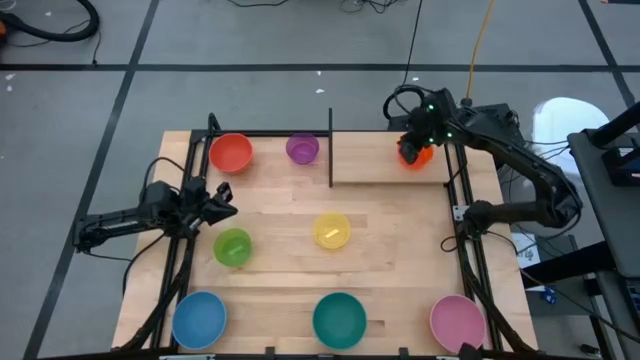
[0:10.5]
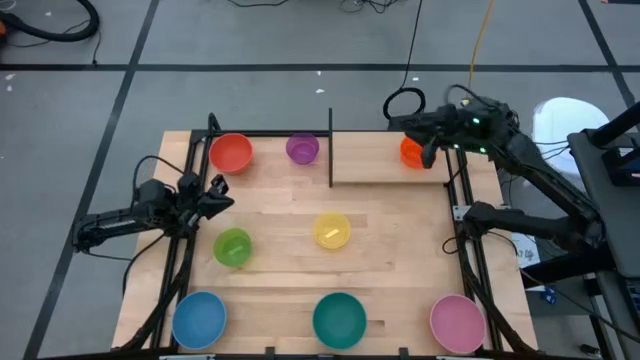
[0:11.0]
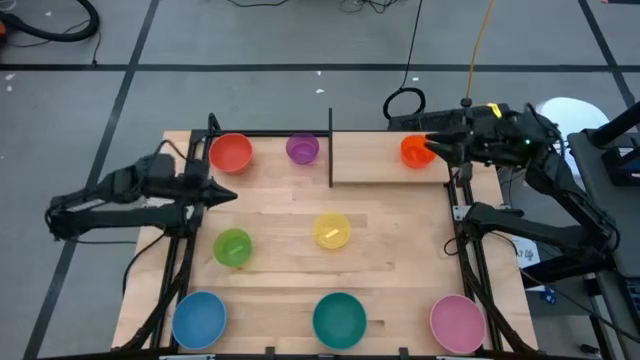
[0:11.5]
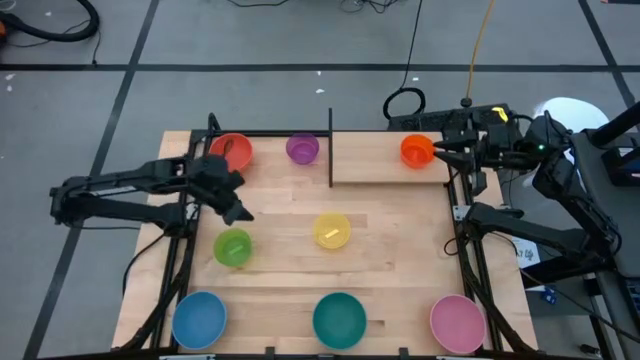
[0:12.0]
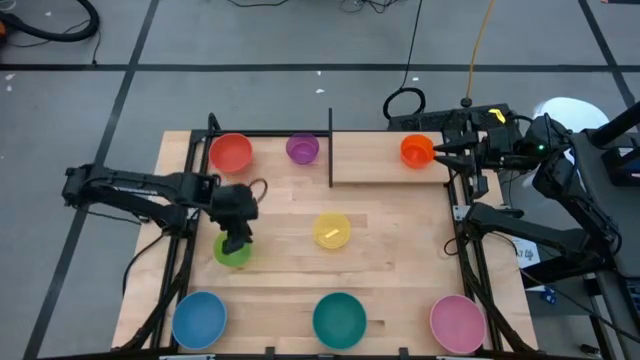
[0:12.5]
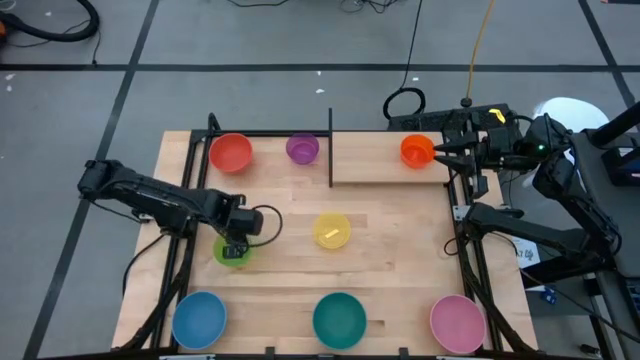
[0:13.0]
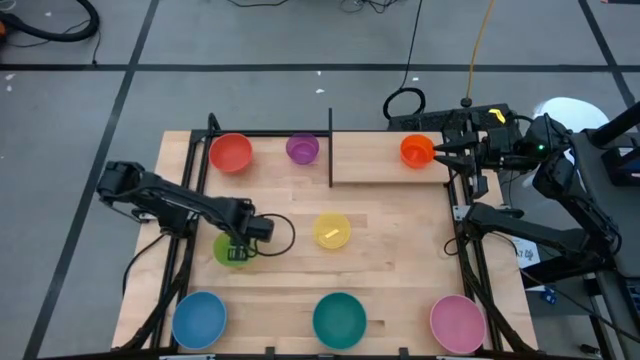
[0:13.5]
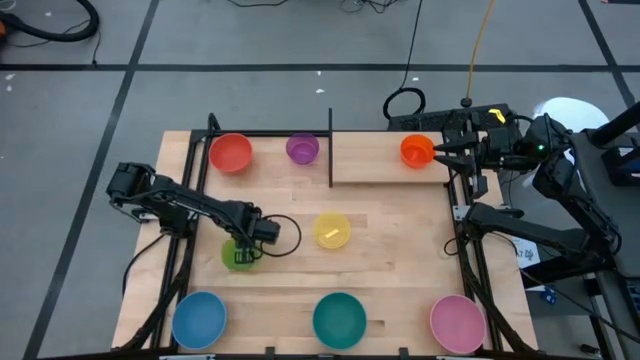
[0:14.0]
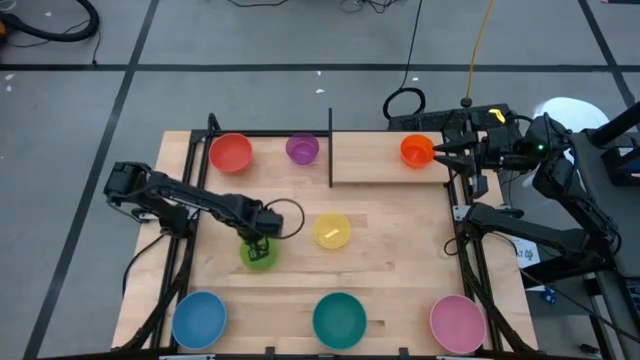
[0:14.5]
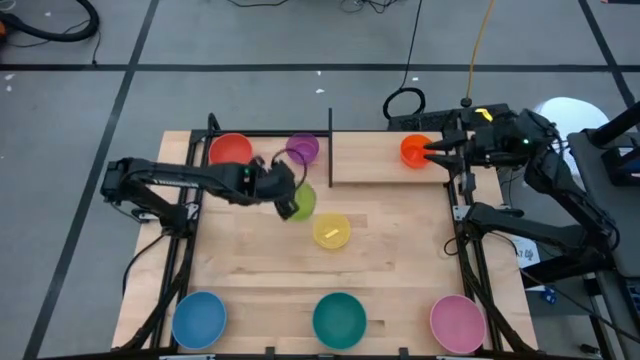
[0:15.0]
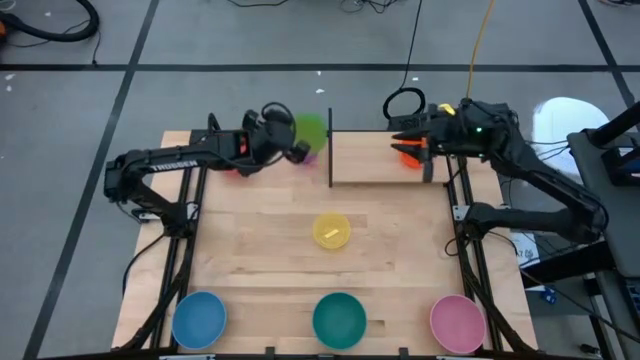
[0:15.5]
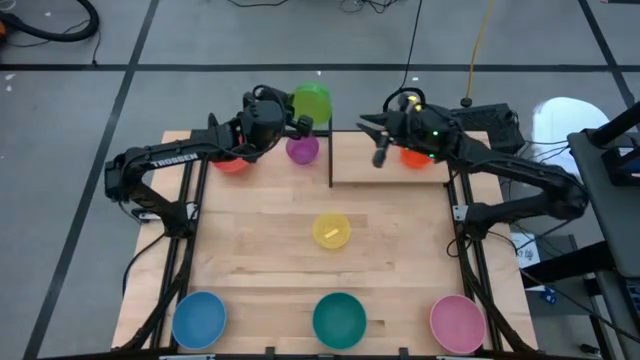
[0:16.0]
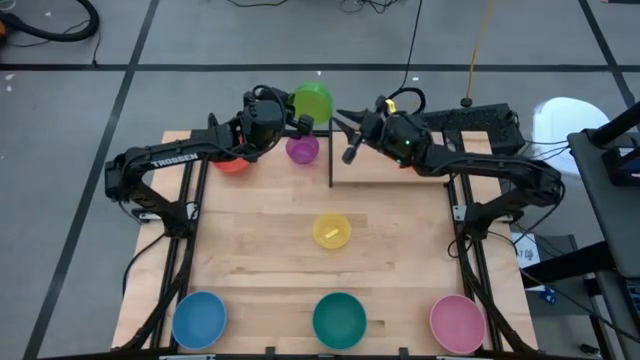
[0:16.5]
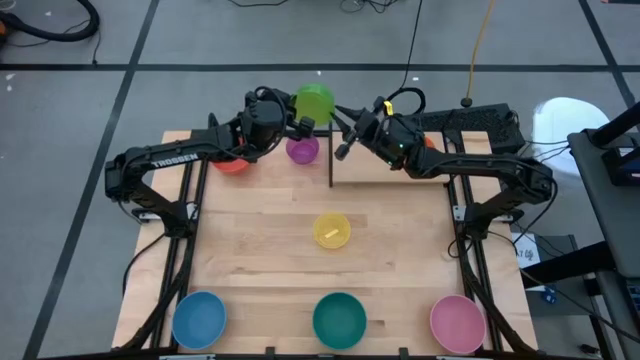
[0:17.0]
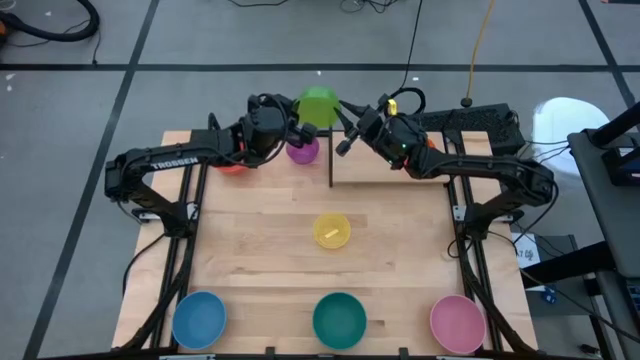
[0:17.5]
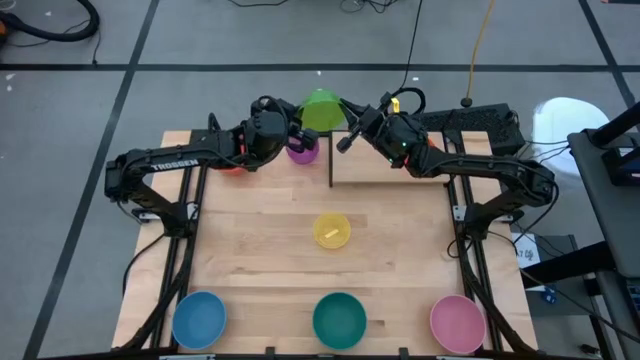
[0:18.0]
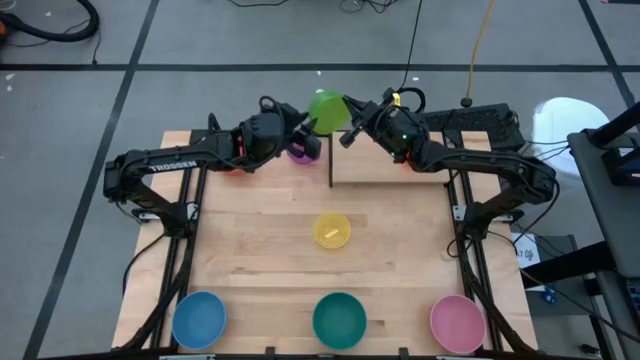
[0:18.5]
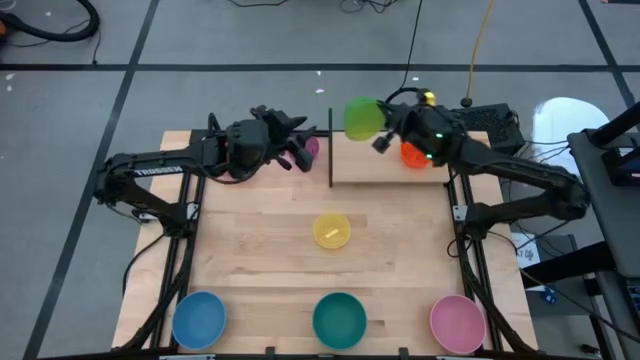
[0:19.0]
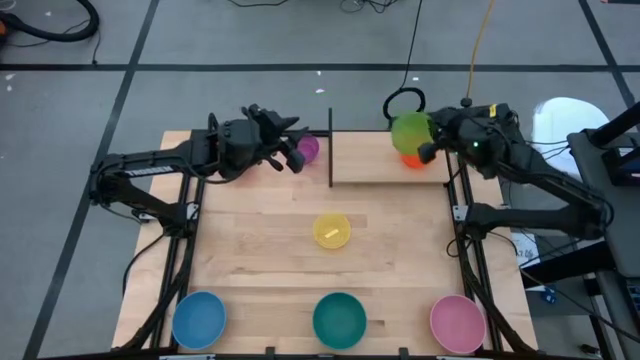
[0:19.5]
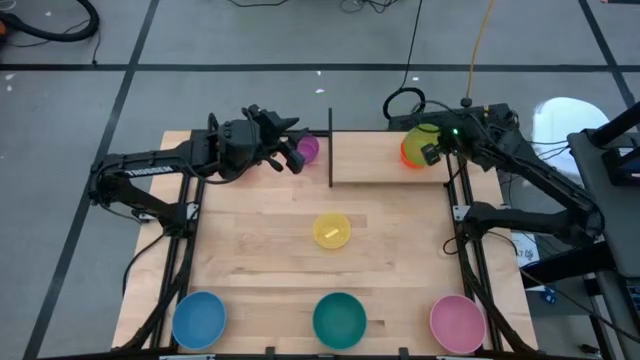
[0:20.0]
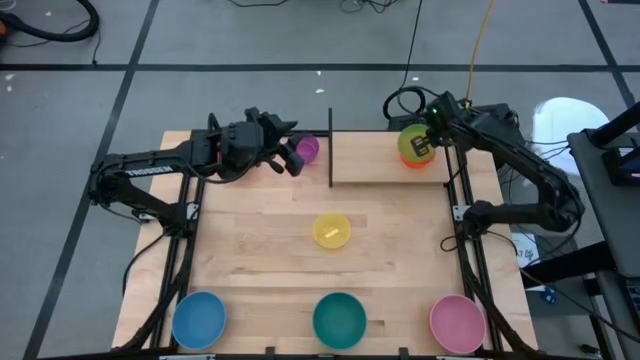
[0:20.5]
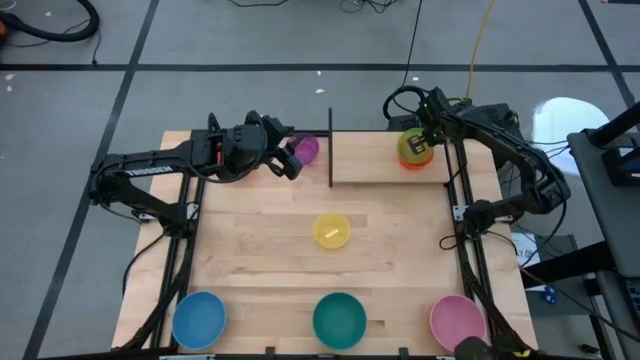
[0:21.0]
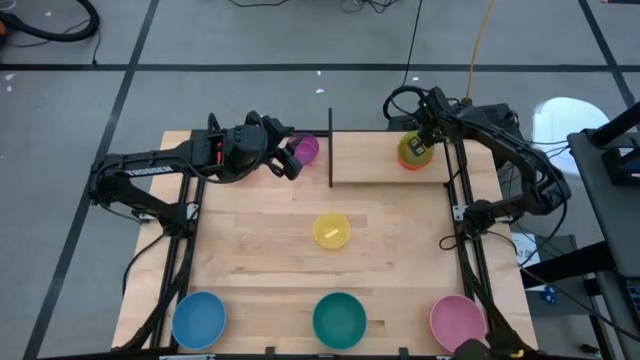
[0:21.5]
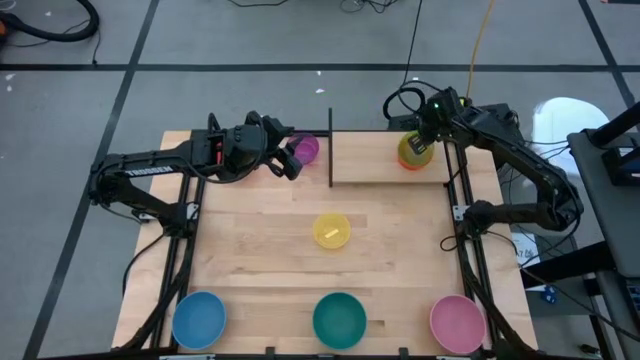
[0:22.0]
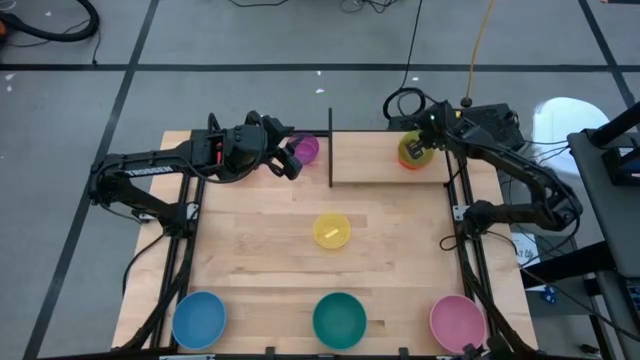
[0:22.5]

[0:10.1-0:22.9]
Task: Place and stack bowls onto a shelf
Stack the small green bowl on top of the small orange bowl on the shelf

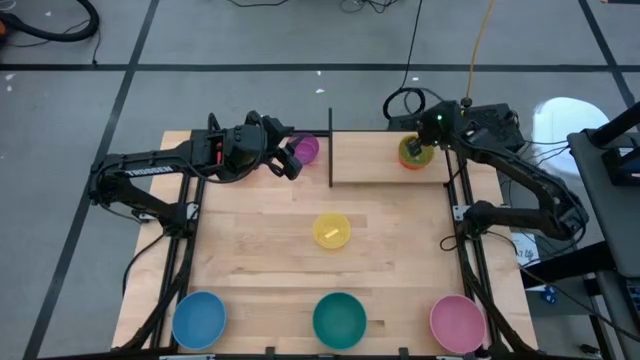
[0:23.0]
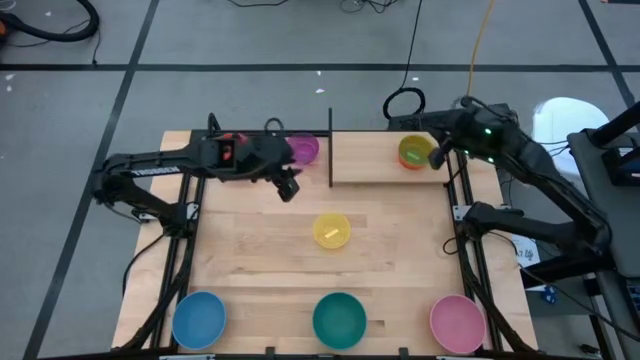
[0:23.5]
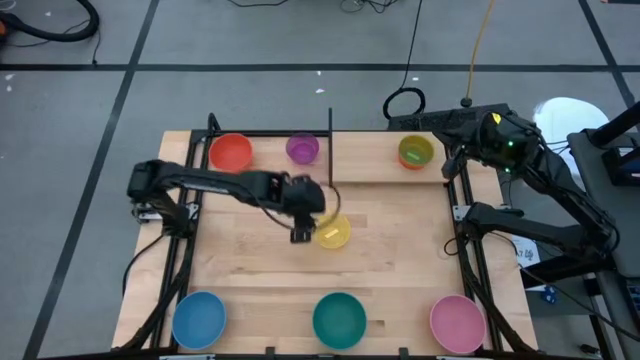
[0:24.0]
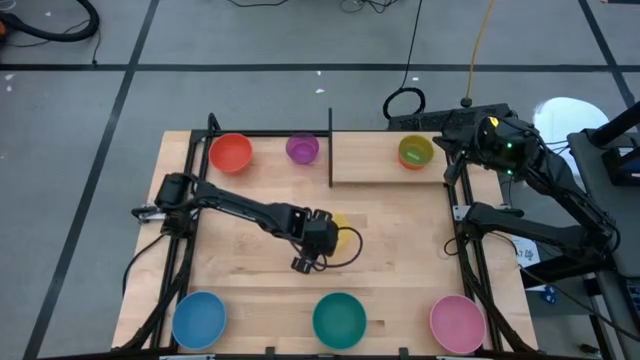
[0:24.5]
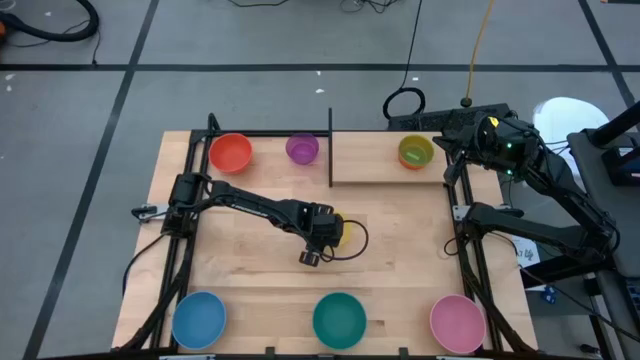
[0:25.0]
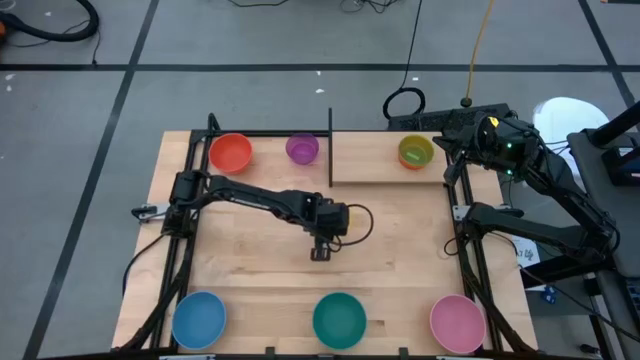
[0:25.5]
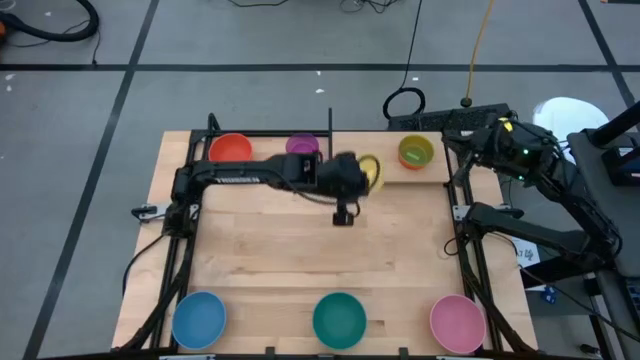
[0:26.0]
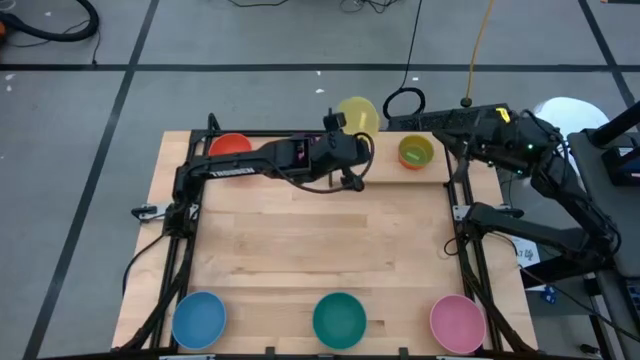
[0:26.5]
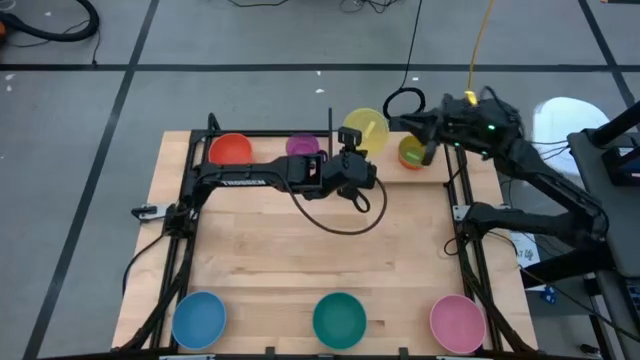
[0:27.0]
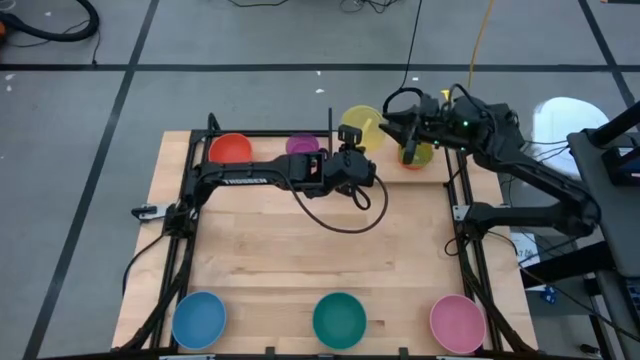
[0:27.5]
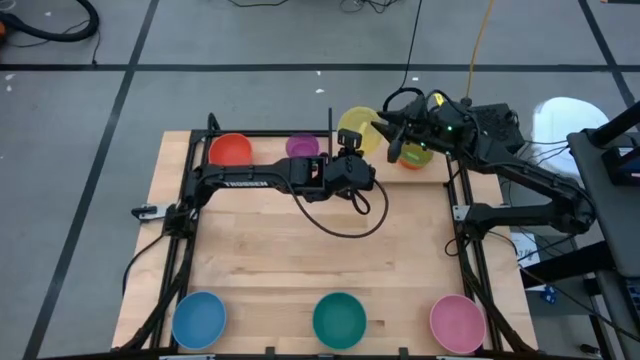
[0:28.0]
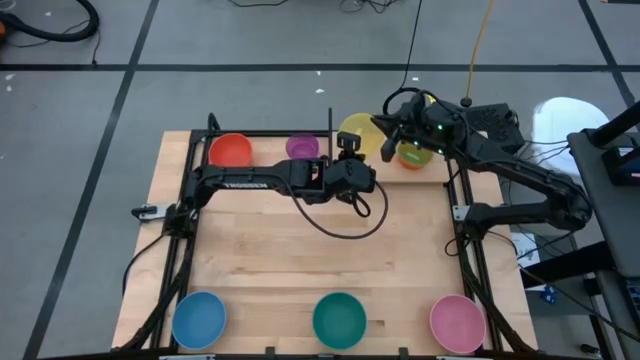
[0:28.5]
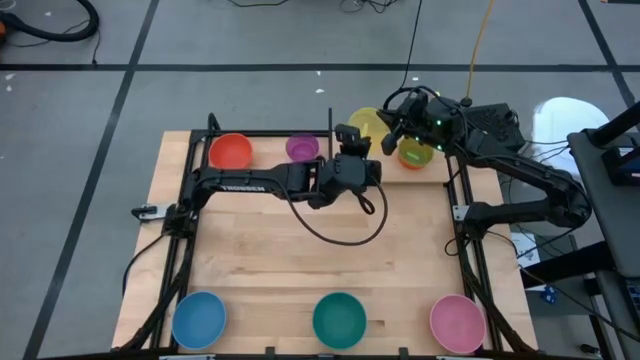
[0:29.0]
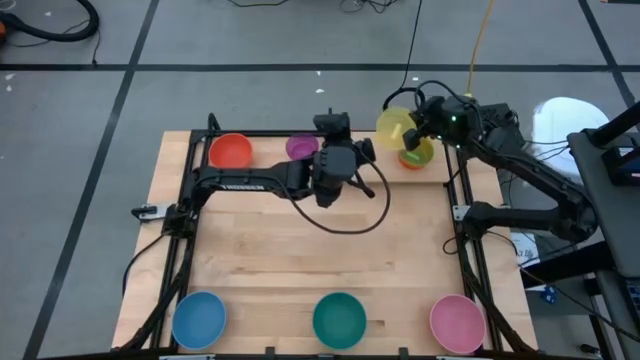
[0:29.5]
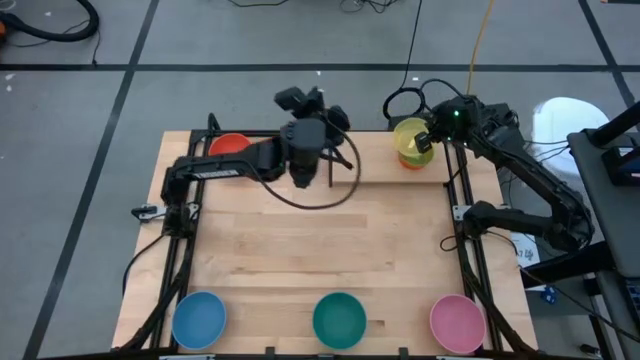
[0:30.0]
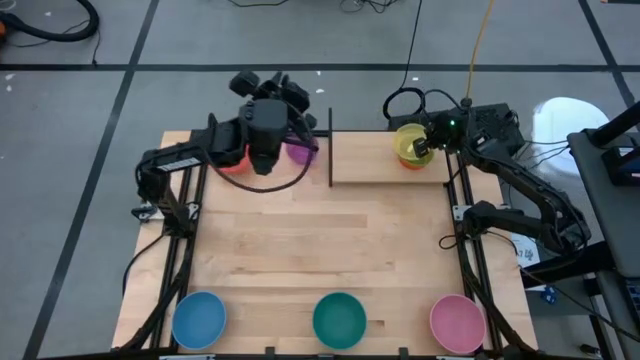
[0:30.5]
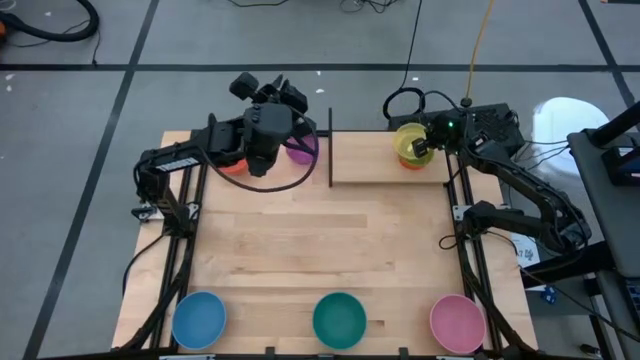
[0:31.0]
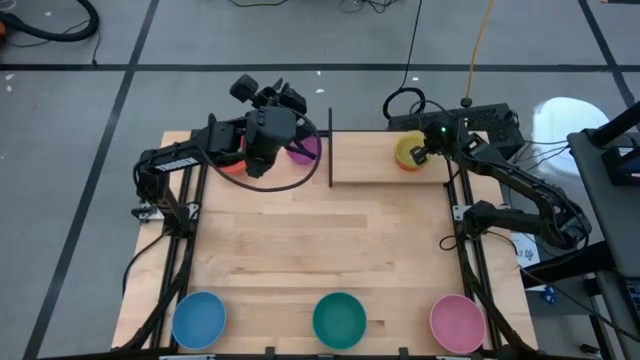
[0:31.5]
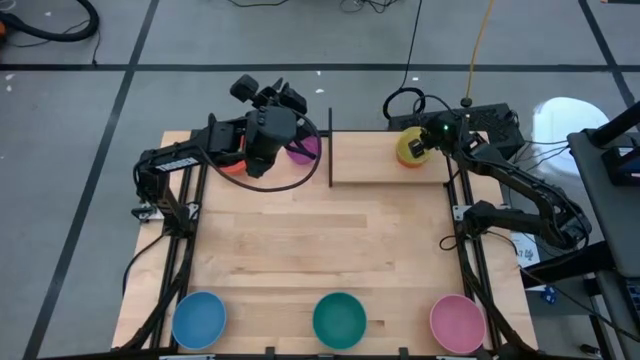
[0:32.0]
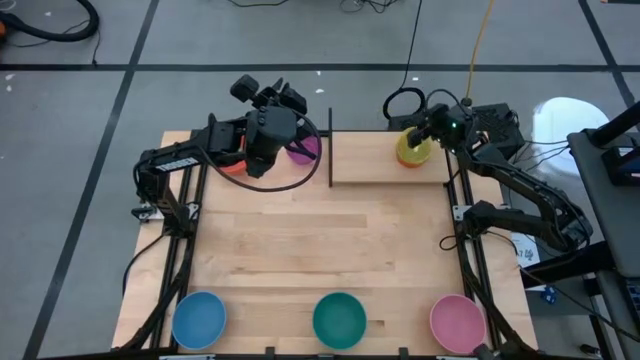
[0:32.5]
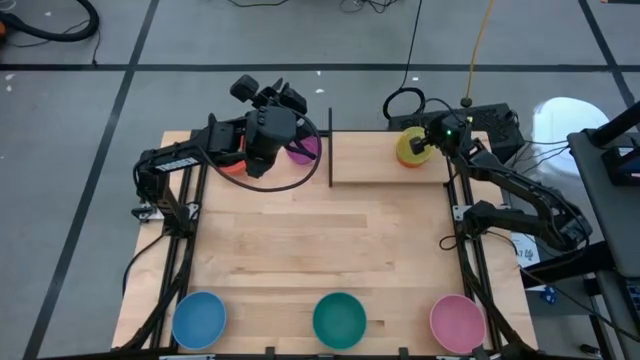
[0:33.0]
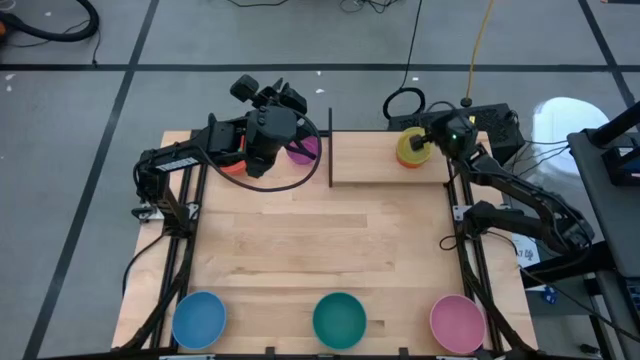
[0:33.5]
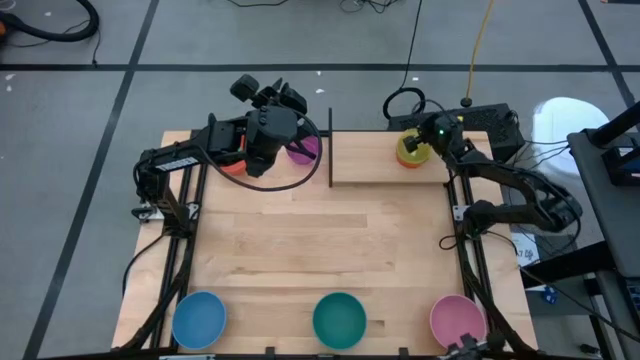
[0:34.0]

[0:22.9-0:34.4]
Stack the small yellow bowl on top of the small green bowl on the shelf
